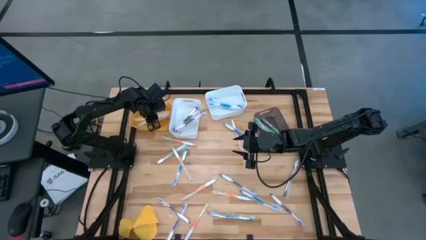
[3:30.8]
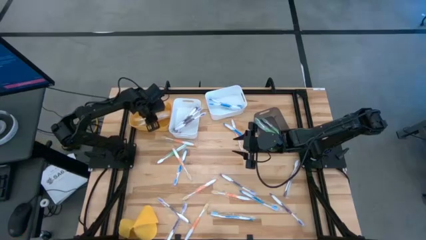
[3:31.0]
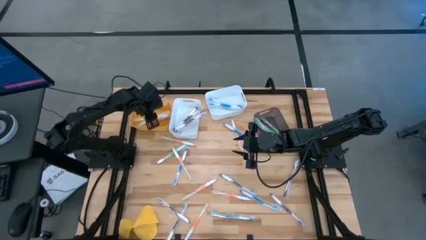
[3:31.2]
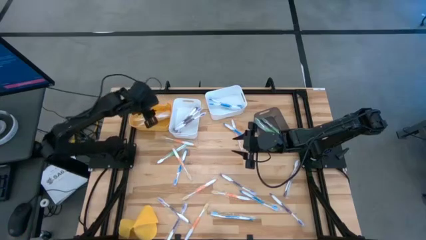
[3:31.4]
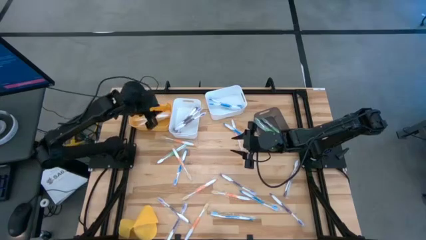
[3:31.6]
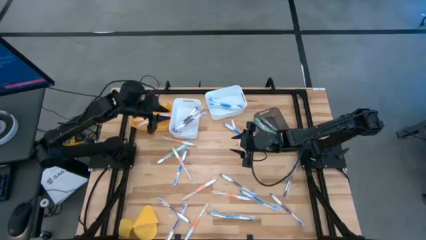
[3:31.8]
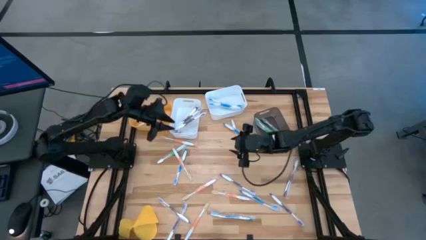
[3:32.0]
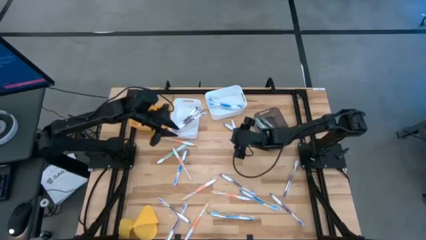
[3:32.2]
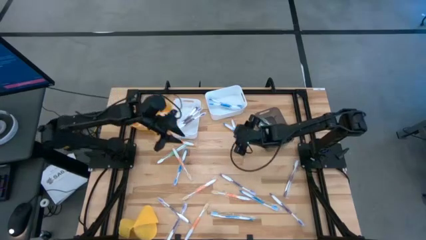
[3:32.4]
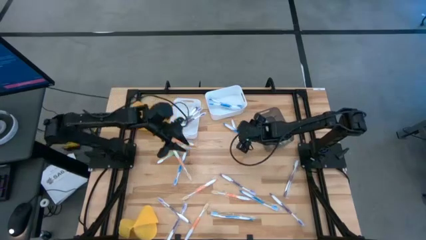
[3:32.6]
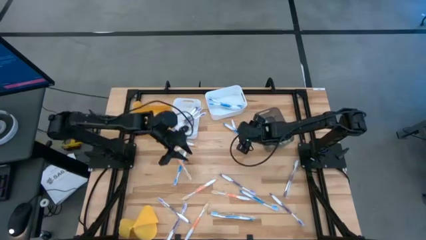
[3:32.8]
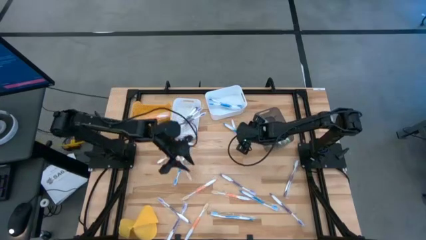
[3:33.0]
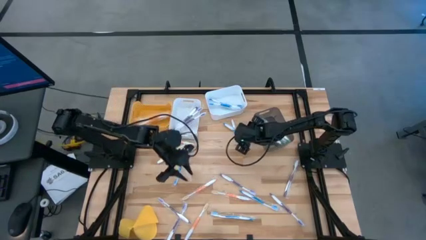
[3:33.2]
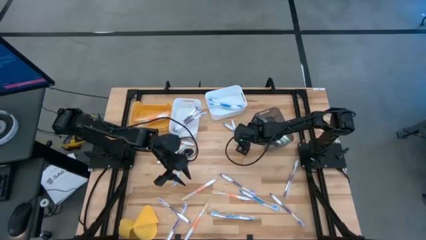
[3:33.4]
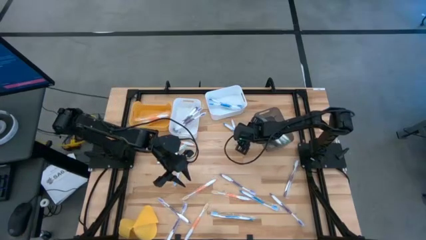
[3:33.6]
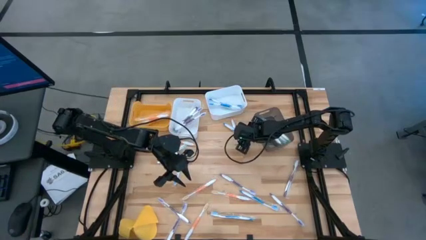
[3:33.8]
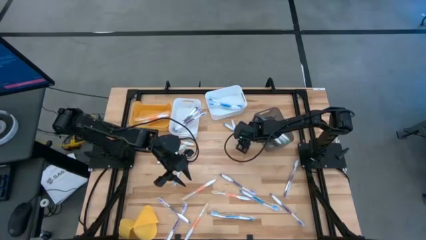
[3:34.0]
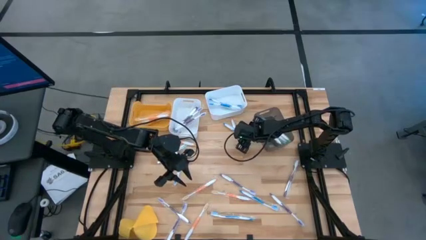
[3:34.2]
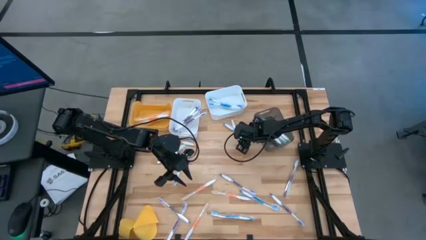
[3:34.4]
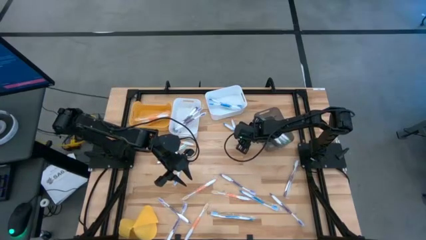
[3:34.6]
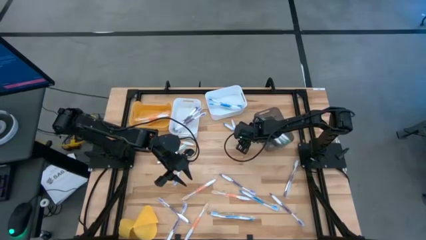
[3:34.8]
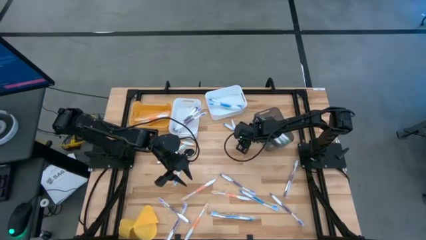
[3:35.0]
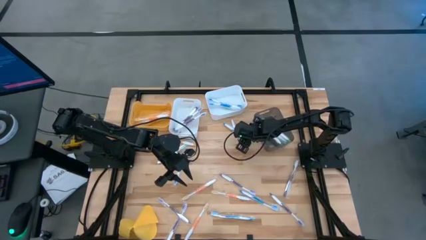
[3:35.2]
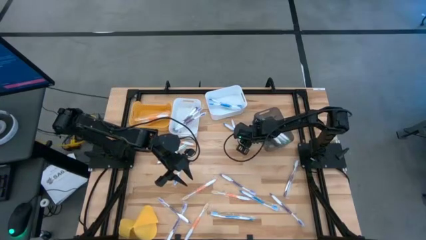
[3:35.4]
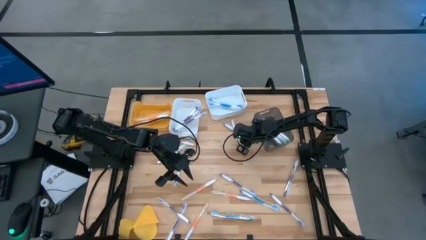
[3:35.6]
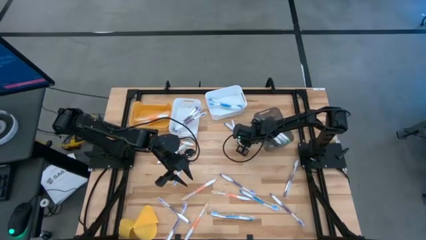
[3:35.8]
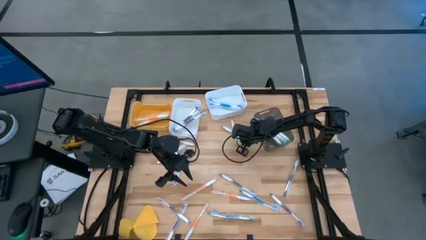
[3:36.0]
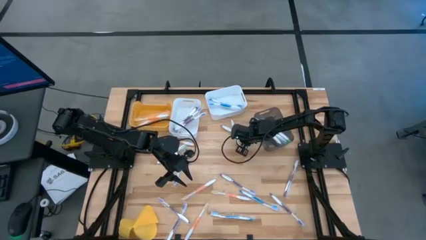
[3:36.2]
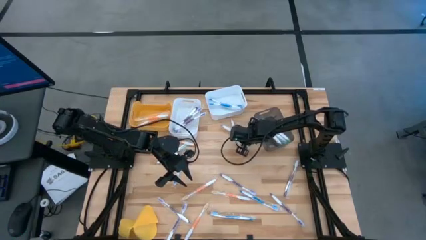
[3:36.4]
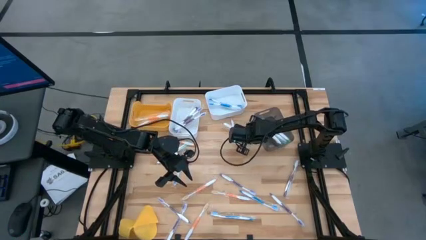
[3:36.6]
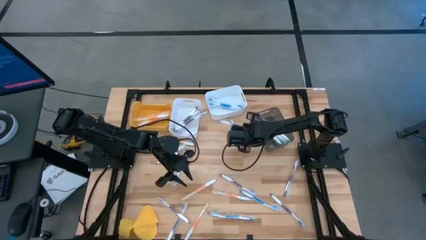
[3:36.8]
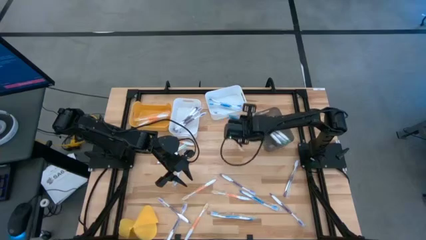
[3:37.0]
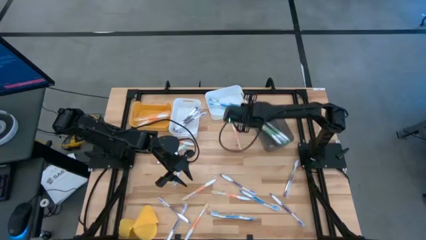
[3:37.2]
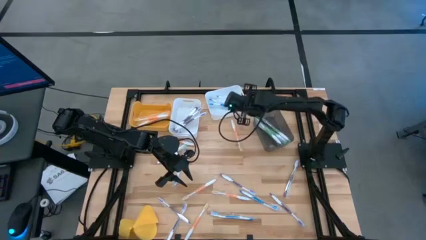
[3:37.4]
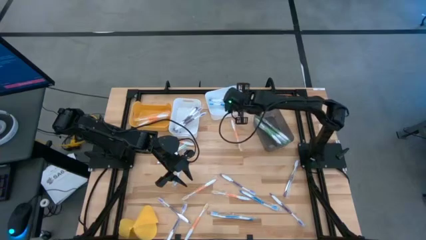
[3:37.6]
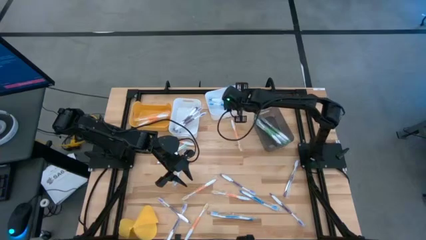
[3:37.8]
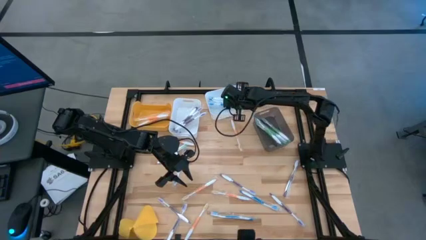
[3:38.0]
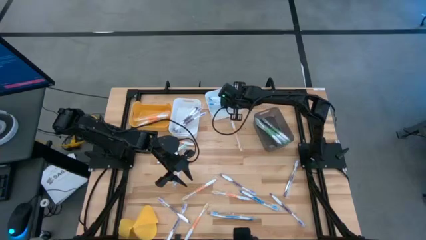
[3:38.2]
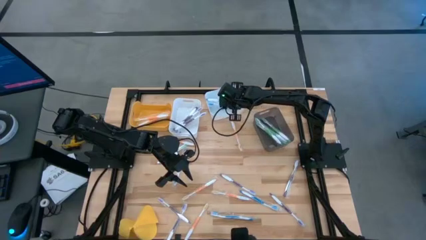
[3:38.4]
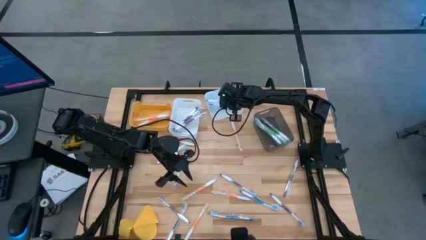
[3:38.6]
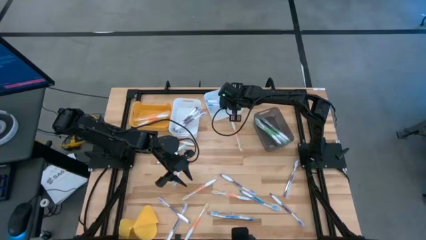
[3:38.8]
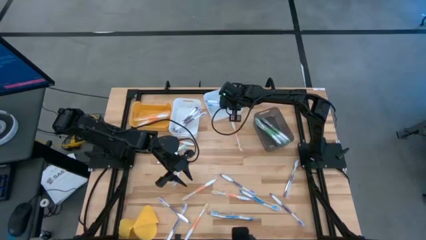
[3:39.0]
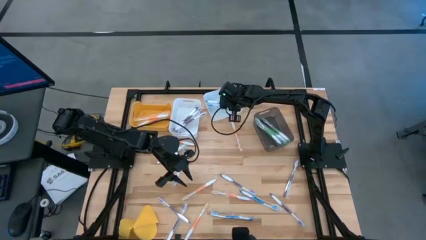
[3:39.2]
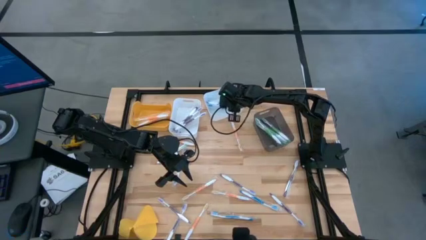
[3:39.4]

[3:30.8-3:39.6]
Task: Pick & Place Toothbrushes
Put the blue toothbrush into the right white bin

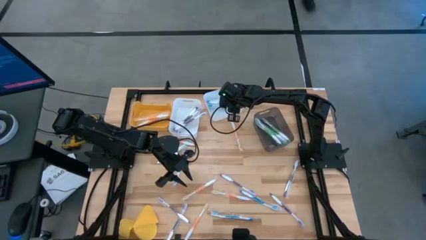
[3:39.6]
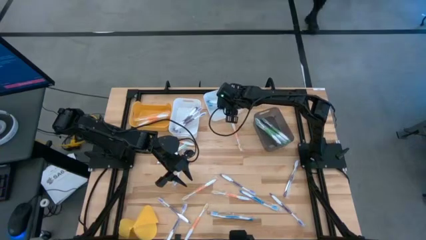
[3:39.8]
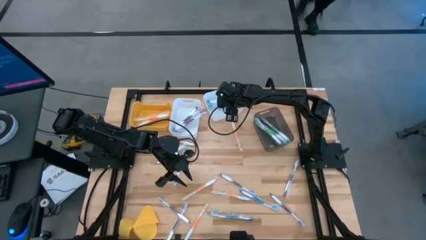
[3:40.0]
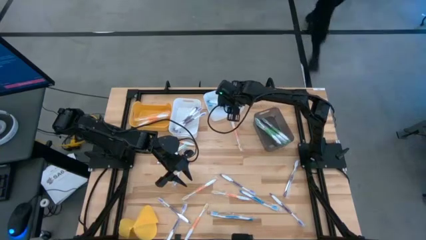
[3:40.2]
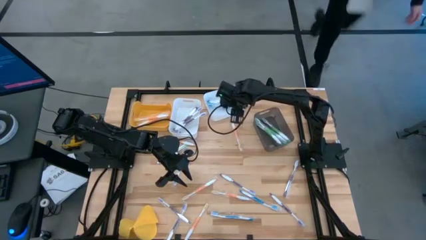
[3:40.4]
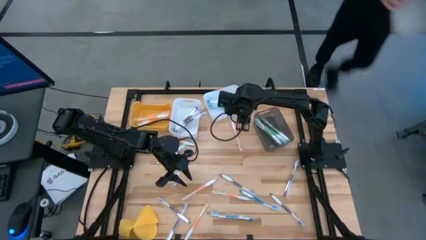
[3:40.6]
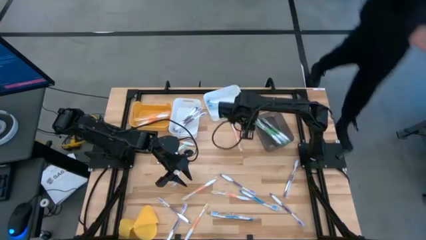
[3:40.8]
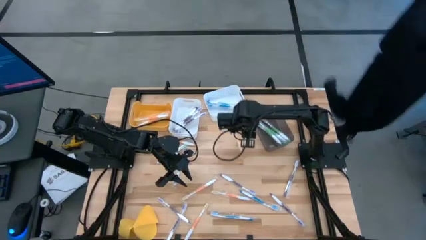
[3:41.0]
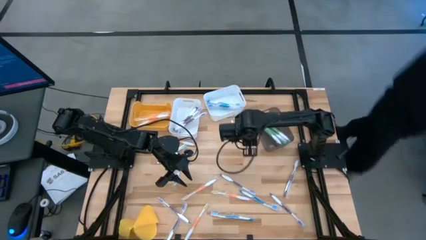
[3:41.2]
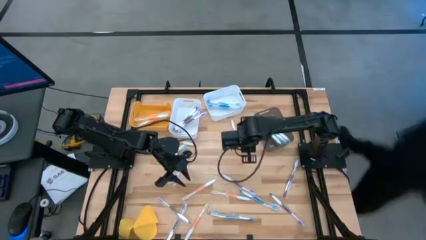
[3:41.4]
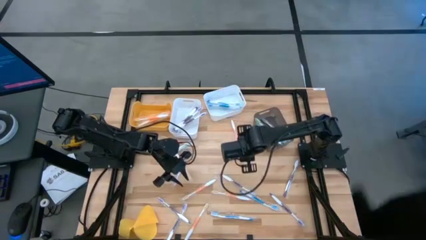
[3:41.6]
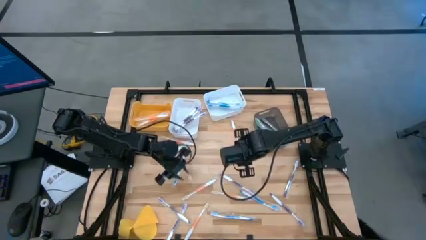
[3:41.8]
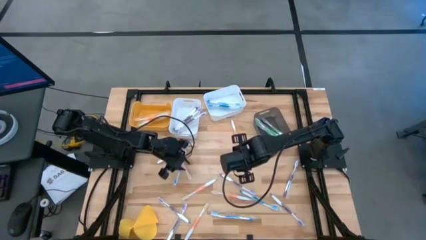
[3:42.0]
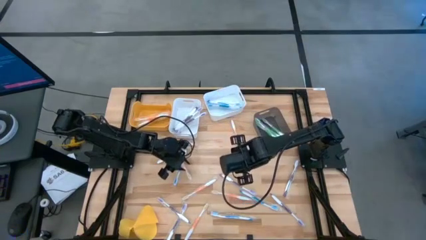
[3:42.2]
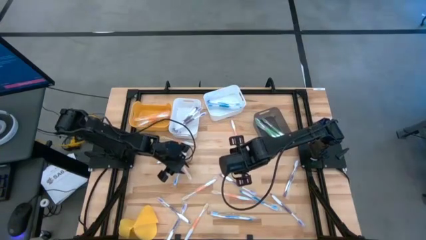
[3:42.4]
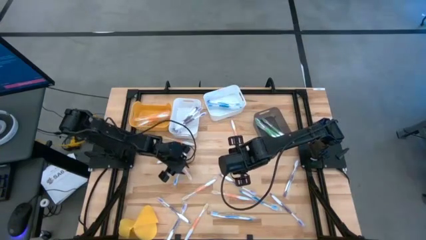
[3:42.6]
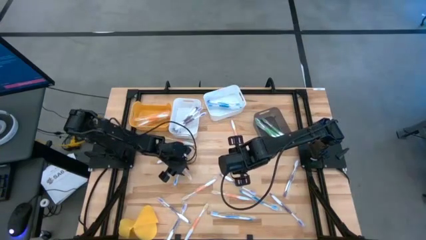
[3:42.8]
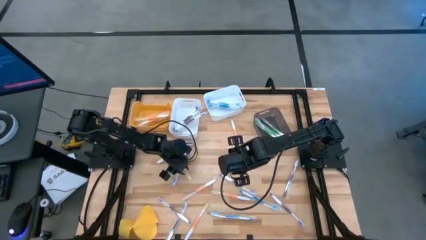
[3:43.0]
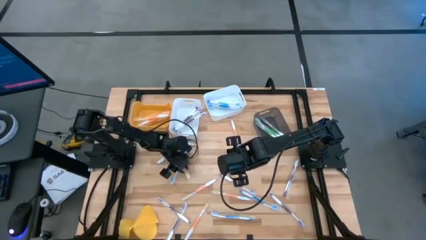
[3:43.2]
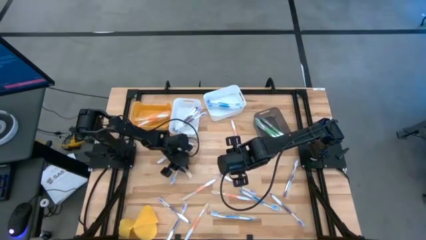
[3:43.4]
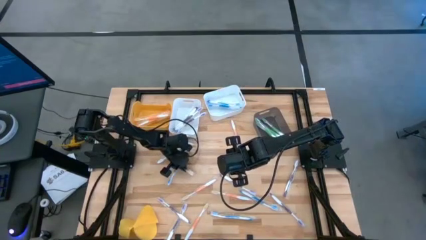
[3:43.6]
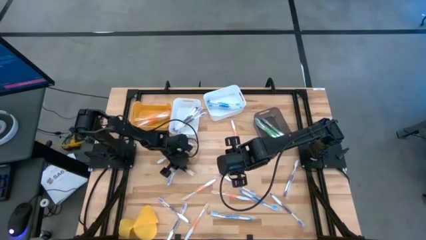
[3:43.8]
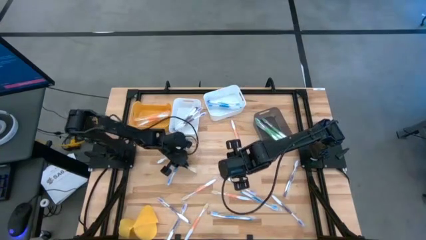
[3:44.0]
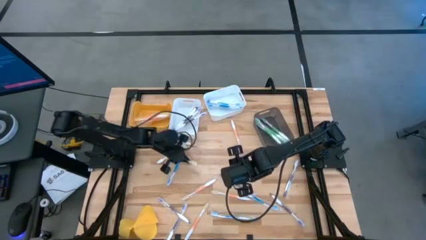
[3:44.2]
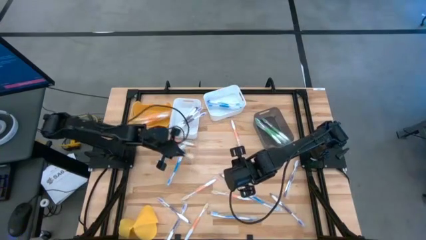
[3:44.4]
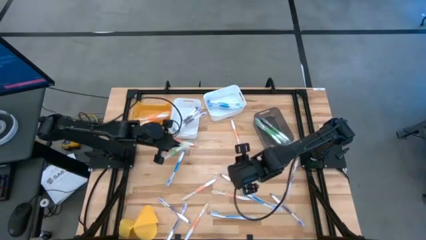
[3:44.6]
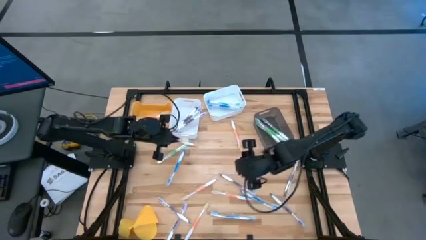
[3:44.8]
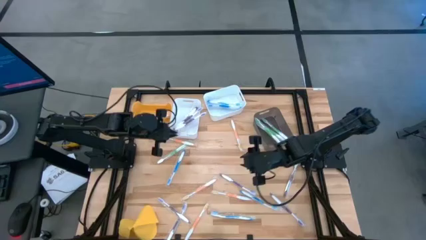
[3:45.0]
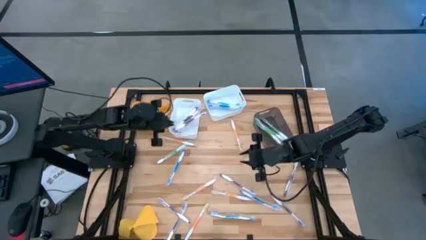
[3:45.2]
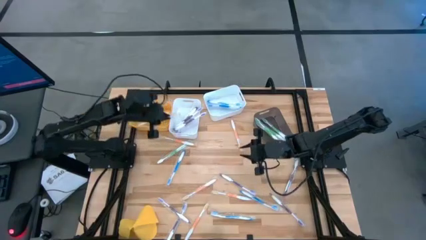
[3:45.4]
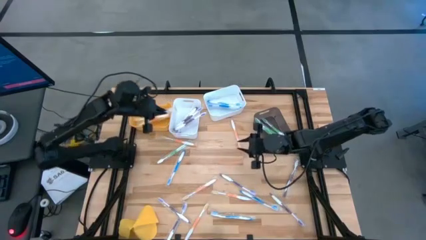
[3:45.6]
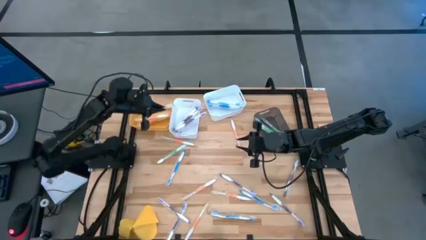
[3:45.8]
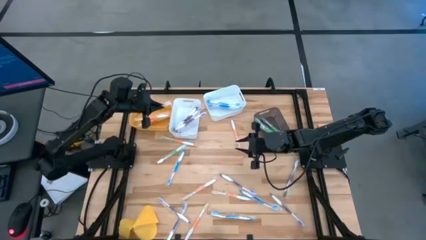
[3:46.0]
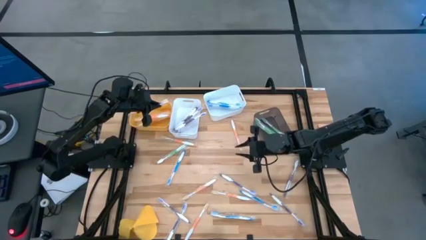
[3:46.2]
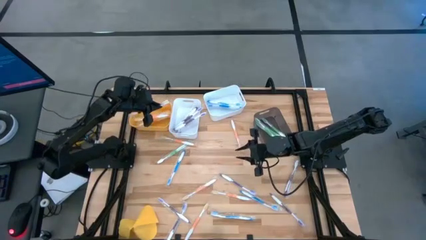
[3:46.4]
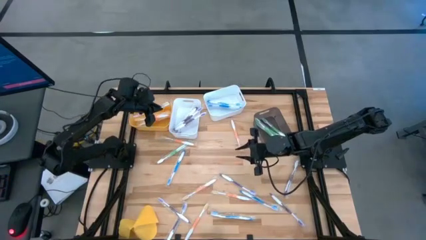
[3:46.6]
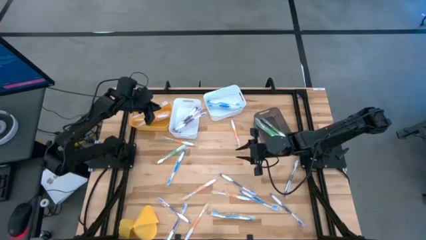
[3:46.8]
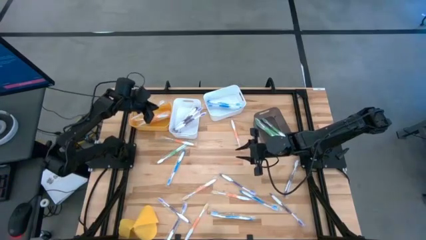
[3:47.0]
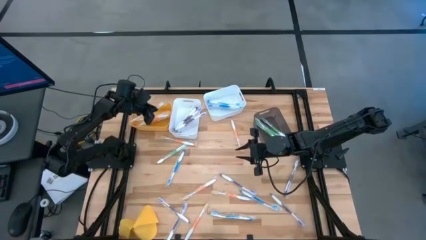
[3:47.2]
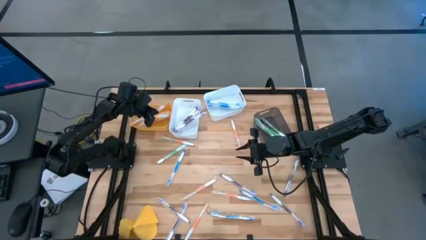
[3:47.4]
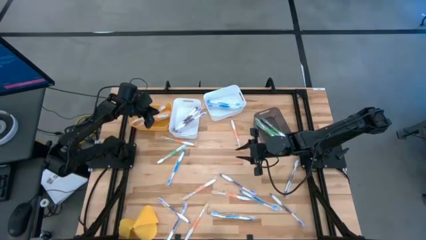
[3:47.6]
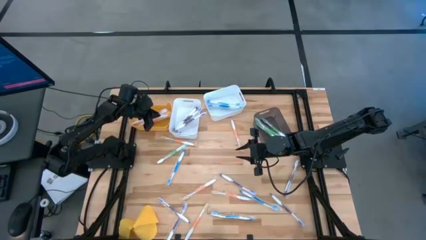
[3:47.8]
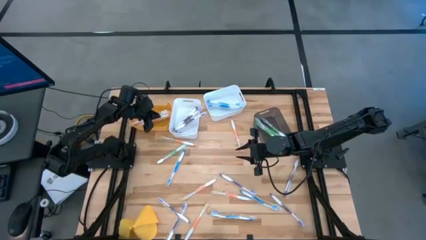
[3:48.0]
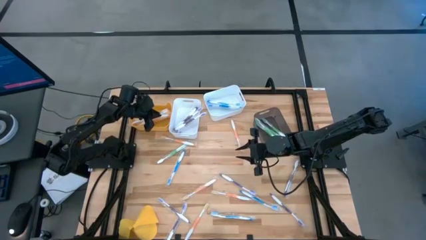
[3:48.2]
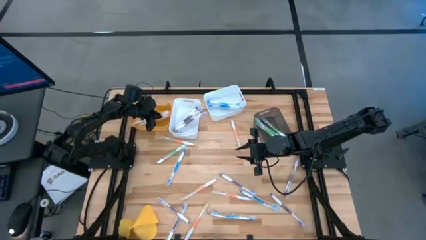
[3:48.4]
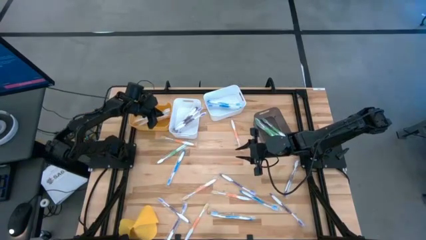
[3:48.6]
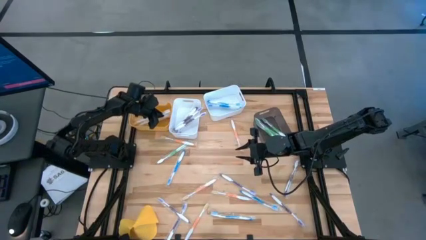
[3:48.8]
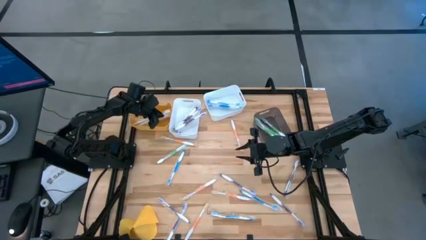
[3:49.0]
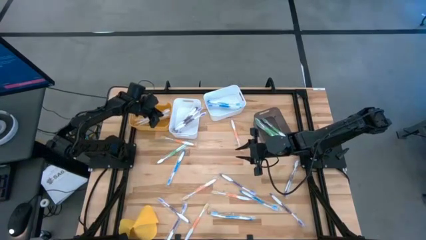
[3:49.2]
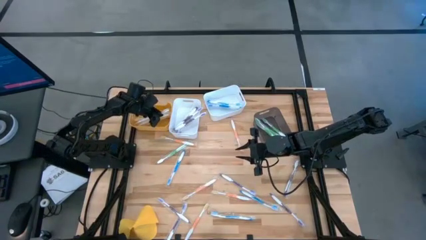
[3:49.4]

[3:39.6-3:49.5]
Put the orange toothbrush into the yellow bin
